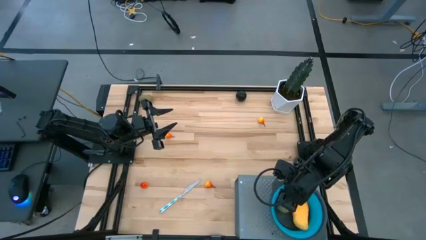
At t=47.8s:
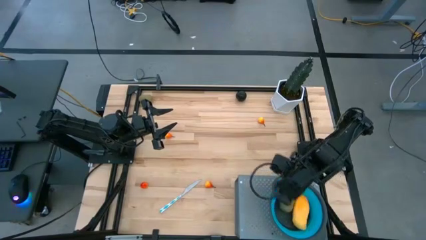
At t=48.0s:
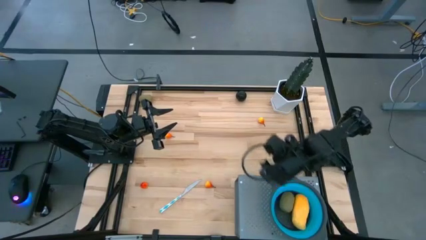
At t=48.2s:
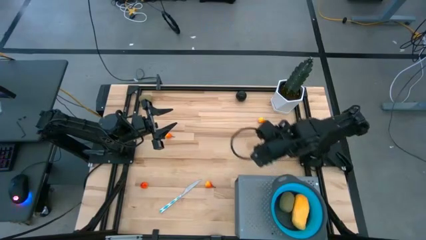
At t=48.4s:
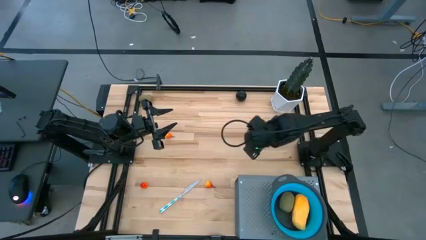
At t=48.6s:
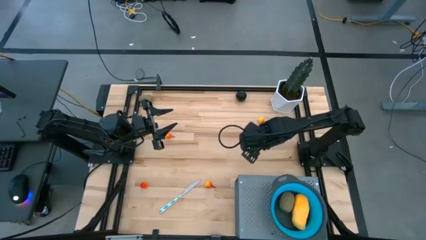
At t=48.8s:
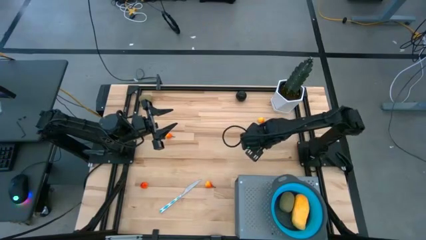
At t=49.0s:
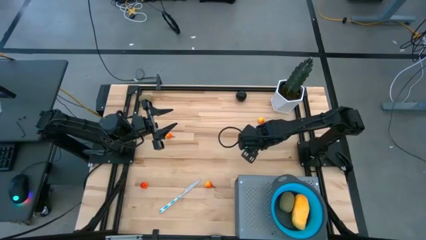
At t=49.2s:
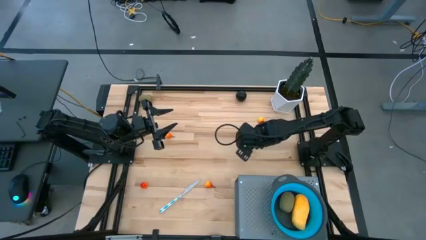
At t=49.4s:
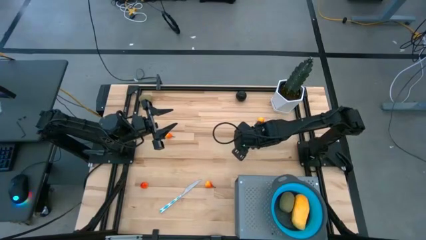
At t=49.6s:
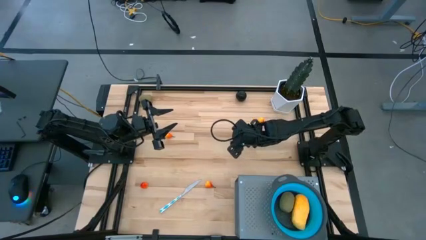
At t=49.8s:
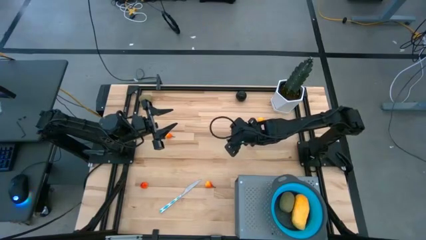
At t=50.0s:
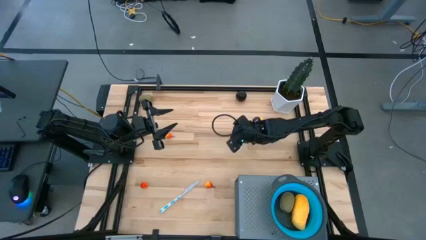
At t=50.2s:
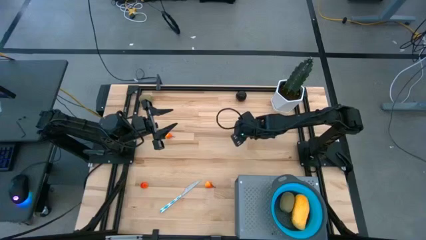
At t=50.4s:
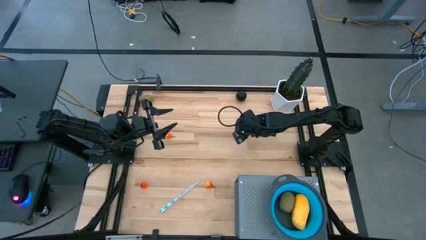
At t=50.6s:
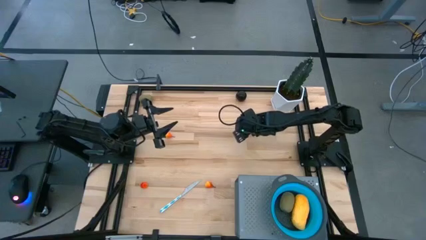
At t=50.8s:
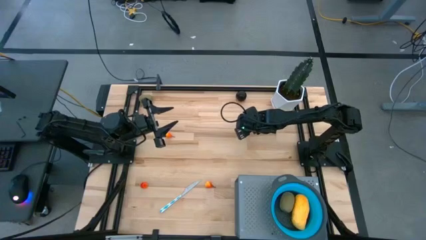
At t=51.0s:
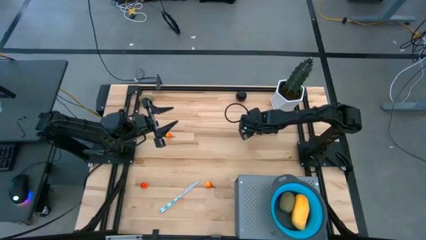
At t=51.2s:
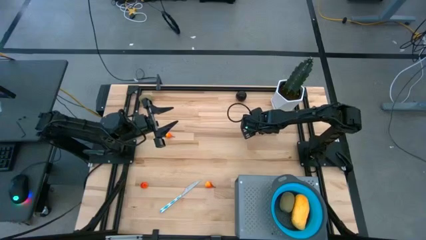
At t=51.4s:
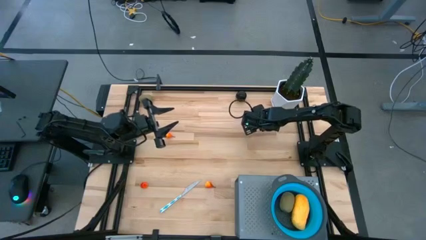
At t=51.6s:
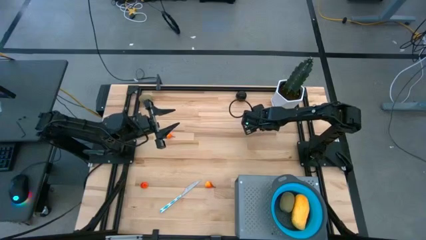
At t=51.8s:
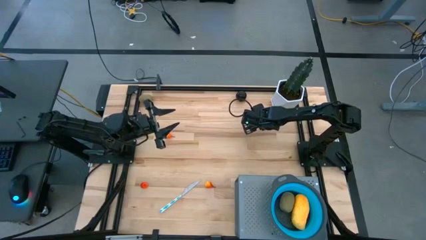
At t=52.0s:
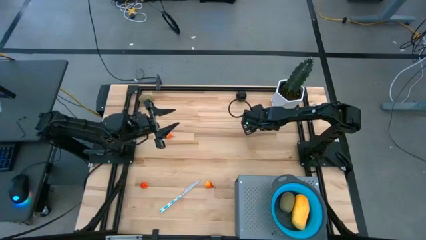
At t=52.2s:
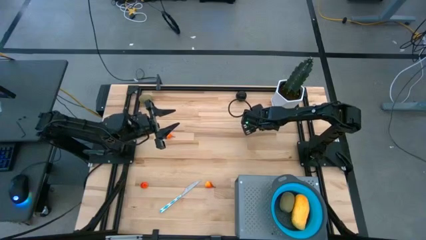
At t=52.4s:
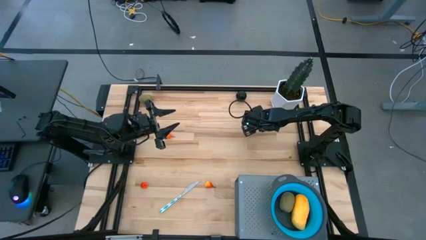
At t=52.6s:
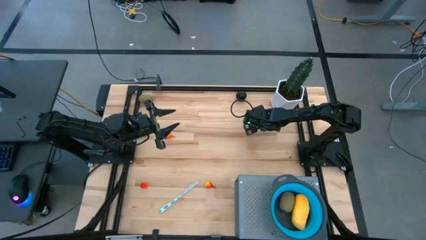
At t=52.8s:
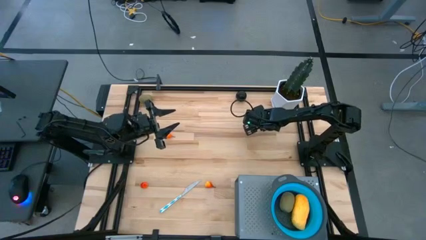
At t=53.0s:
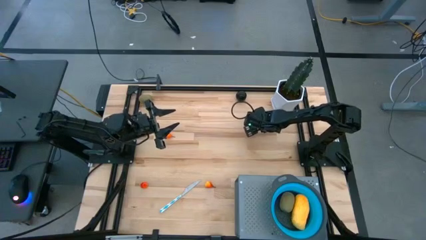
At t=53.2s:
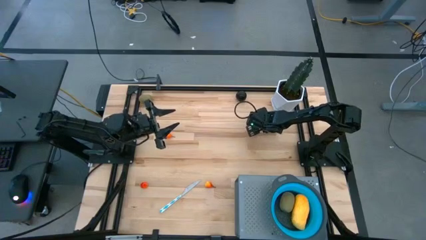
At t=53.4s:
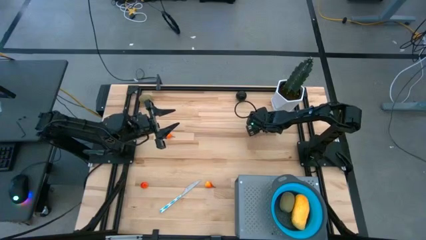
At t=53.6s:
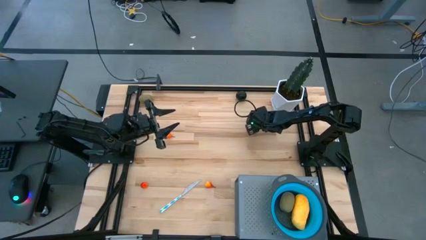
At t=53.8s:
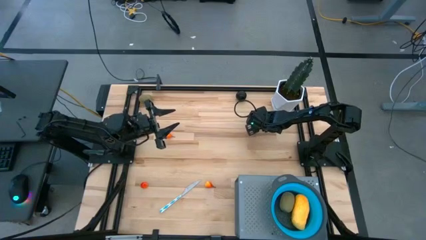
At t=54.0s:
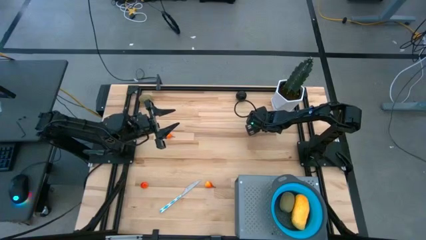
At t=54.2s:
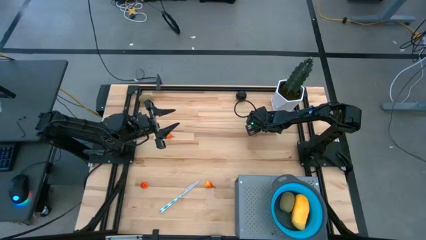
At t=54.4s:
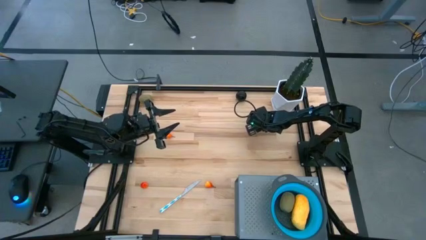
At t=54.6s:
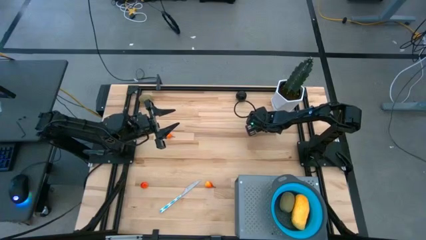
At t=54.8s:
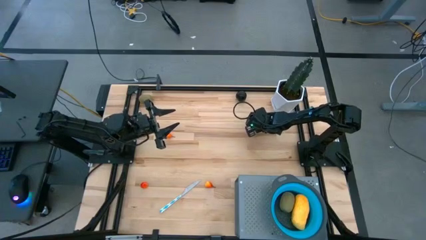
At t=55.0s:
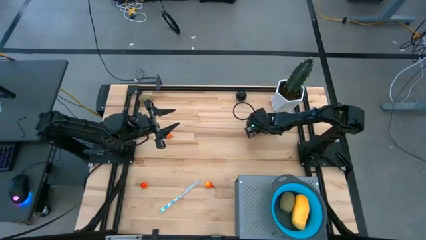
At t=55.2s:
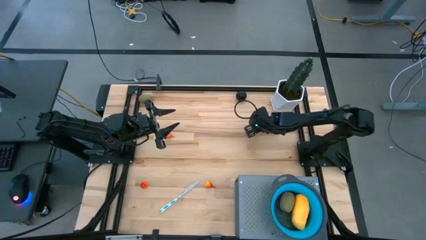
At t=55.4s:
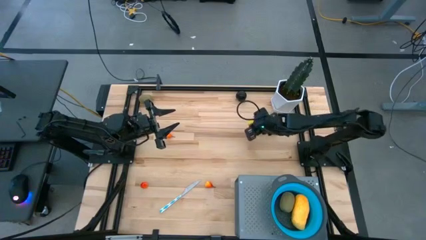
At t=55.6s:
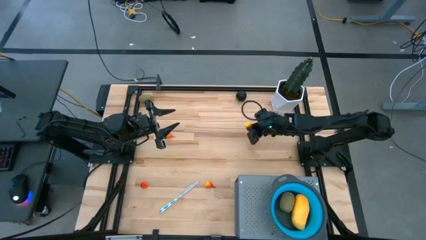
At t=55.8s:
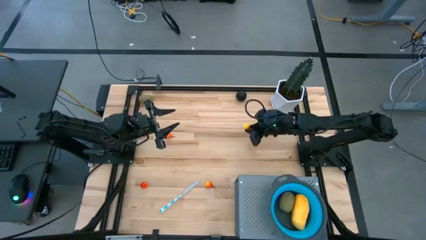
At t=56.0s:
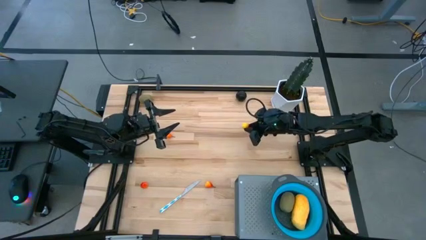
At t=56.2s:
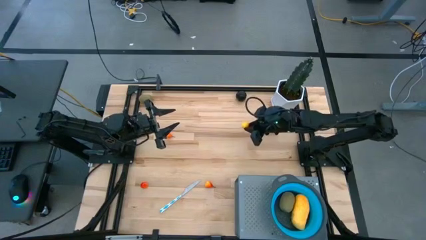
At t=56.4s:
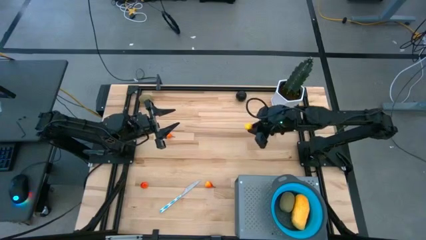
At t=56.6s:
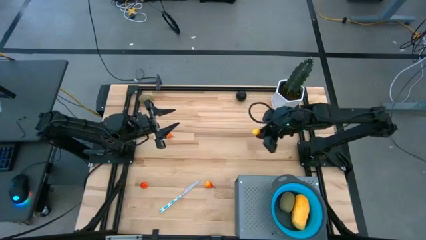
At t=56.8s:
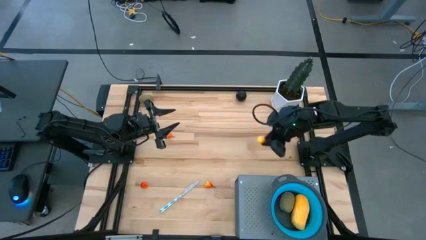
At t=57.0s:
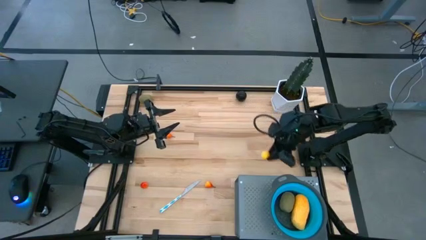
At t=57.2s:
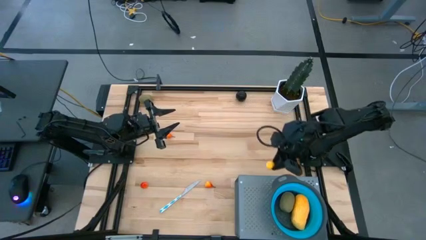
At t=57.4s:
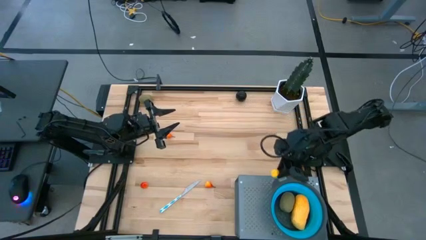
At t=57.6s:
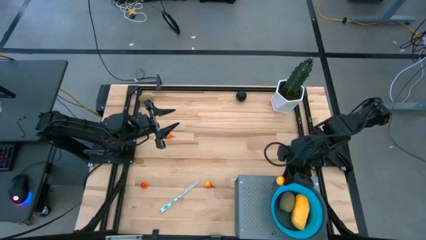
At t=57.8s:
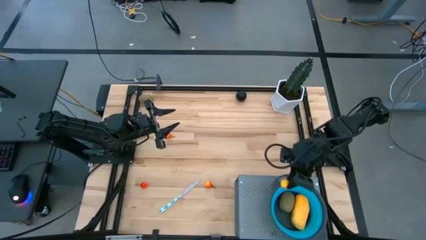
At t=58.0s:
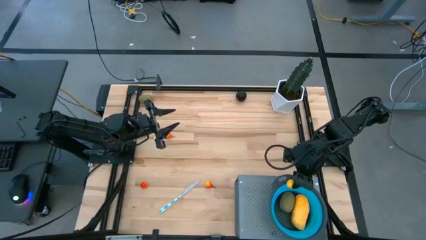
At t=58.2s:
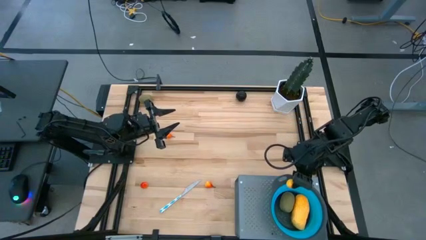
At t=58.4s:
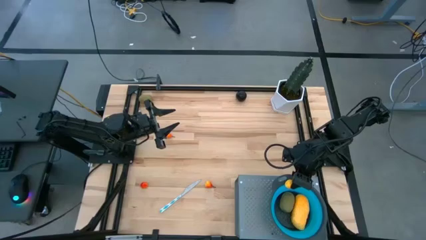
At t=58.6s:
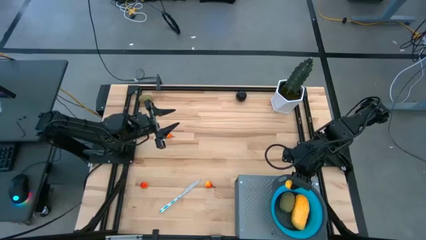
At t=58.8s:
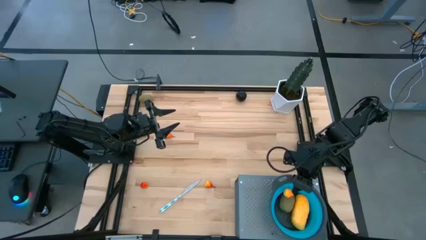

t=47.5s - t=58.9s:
Task: Pick & Place Fruit
Put the yellow pear into the blue strainer bowl on the shelf

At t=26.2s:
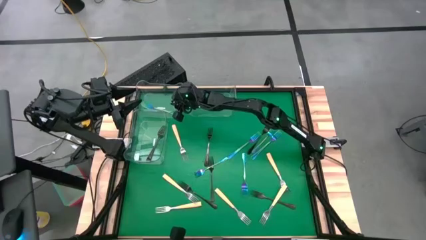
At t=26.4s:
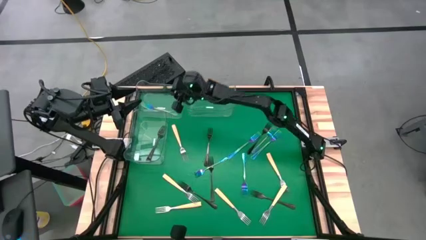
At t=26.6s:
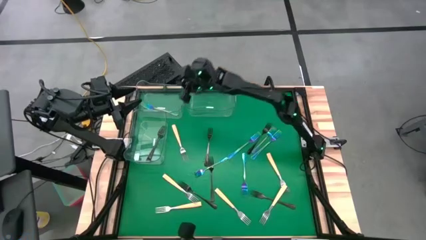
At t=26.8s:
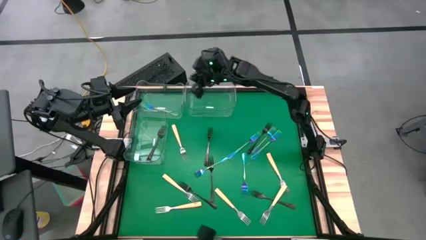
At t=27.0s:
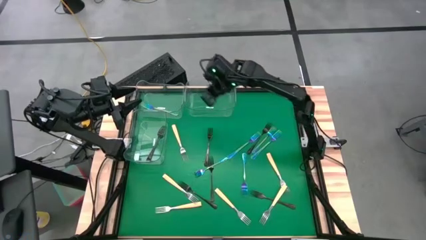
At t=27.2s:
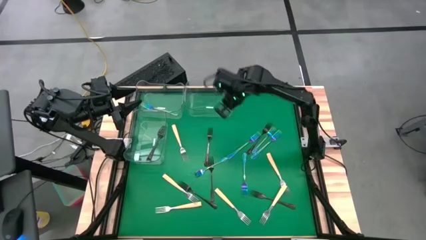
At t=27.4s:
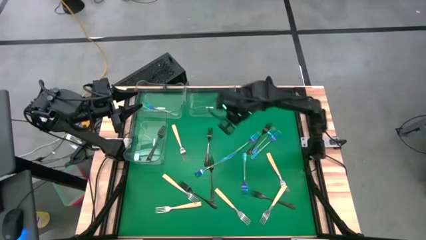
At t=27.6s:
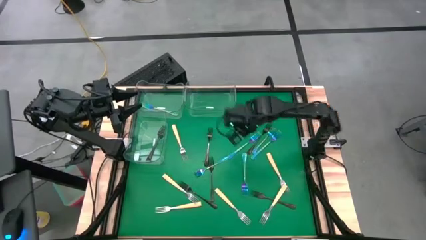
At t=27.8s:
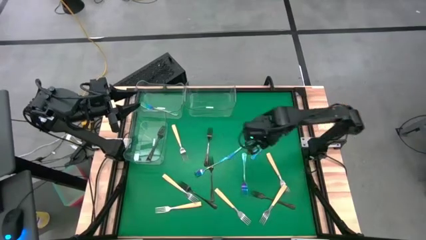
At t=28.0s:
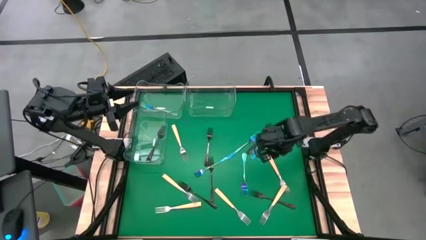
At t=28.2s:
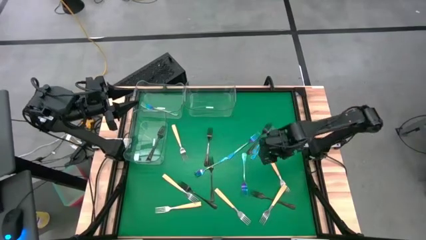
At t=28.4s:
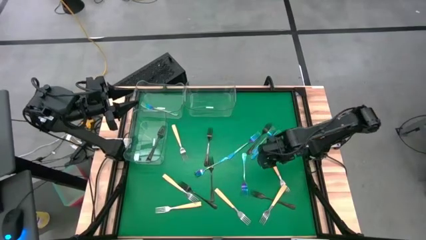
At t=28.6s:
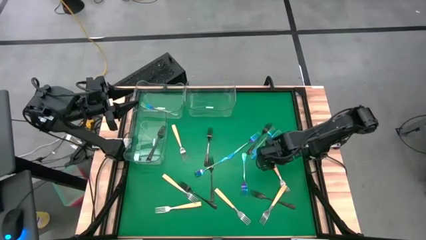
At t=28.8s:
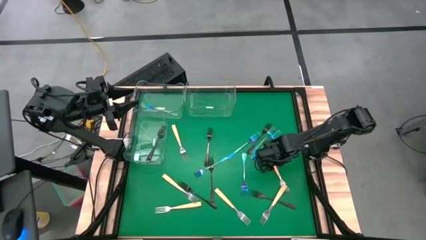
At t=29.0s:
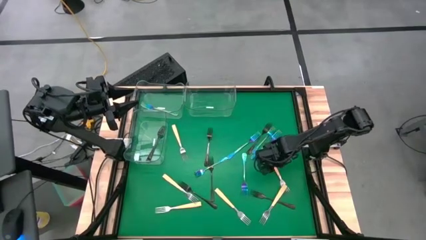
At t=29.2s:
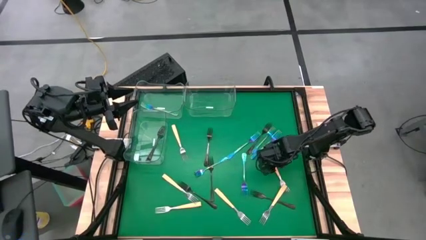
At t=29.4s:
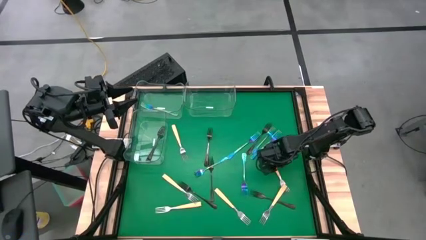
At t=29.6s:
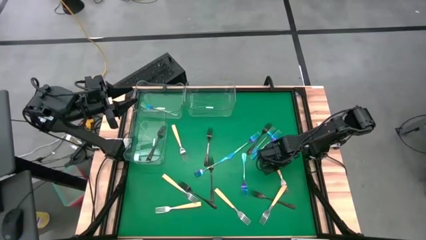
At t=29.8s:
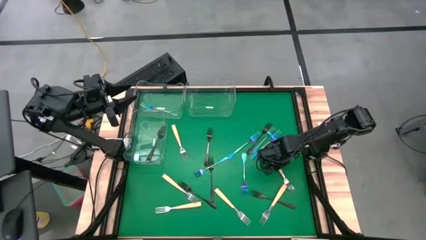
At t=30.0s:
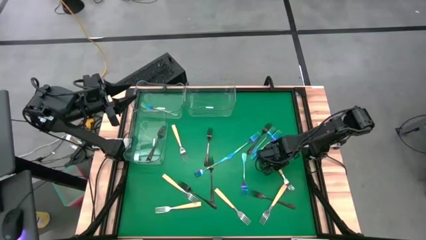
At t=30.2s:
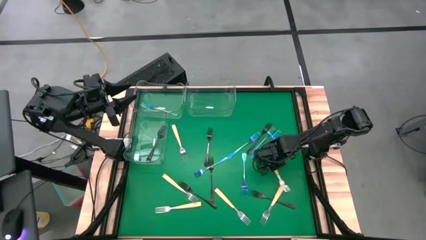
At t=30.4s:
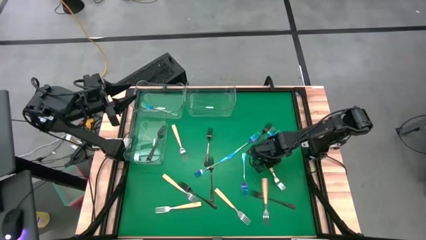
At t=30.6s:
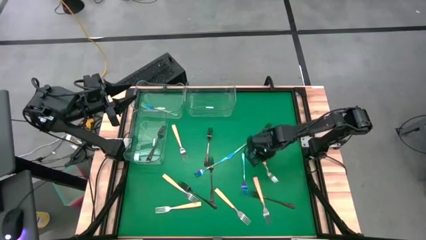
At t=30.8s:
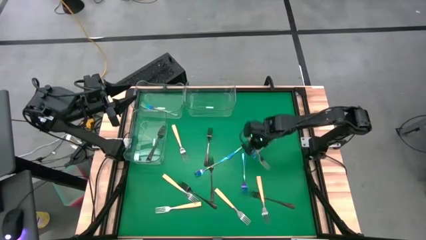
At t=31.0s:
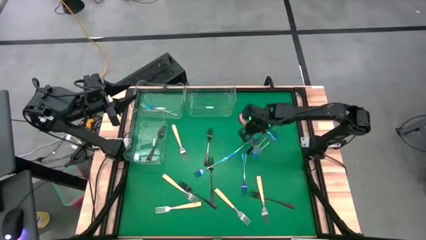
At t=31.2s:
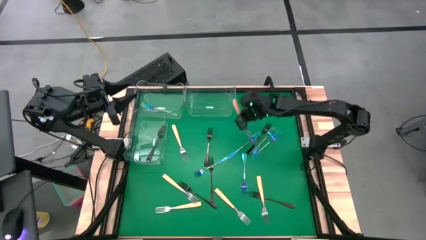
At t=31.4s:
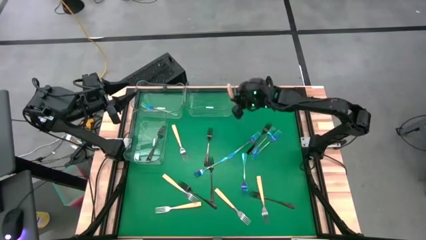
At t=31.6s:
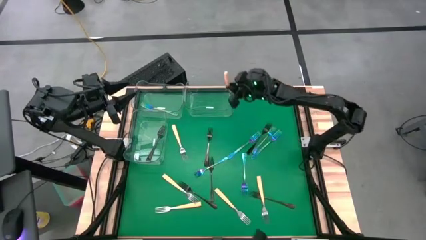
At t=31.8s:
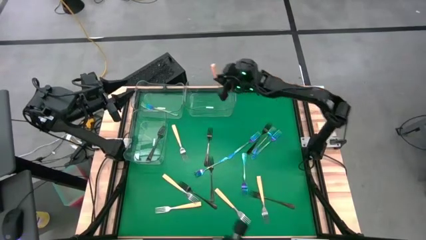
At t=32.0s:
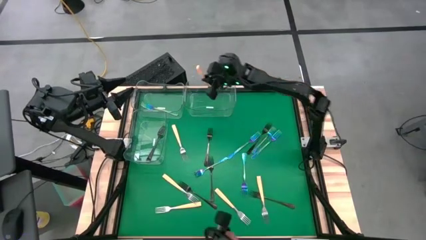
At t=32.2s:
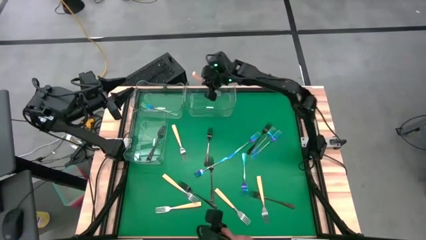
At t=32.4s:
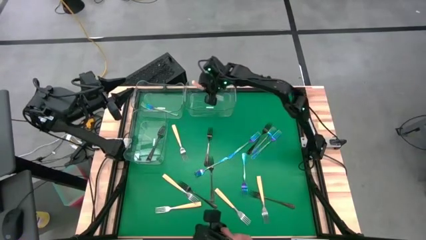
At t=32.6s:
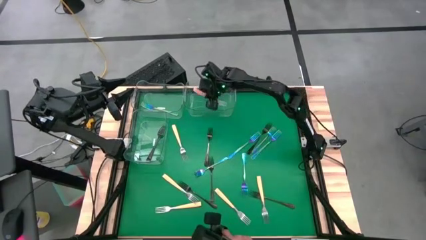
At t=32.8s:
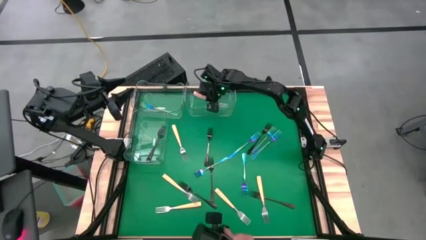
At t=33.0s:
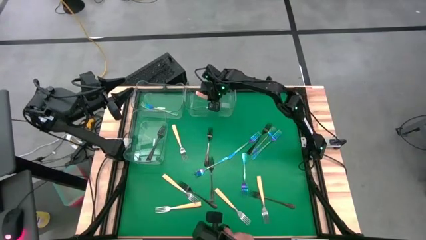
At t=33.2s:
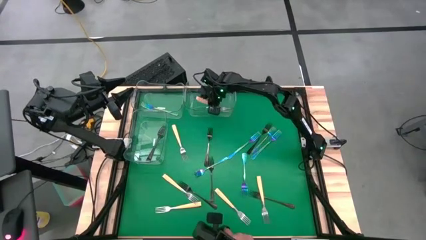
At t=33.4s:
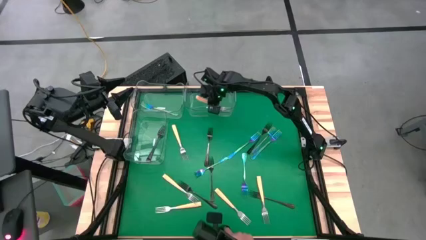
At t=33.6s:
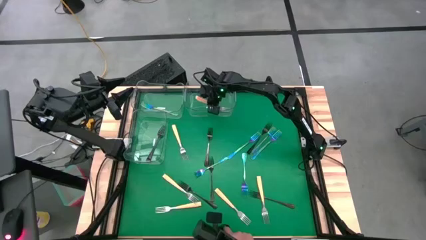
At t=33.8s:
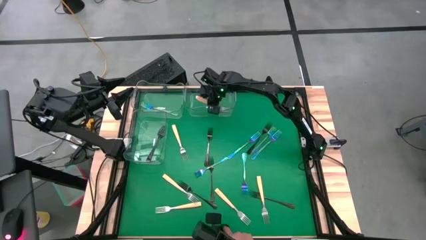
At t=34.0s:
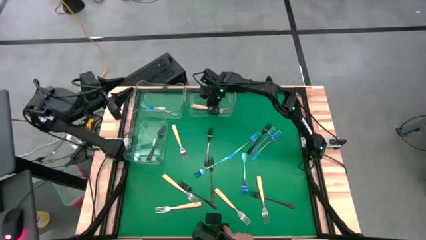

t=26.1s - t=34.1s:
Task: Sort silverware by color (type)
Put the yellow fork into the top right transparent bin
